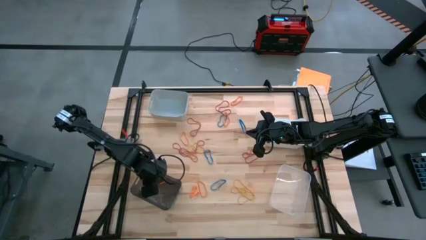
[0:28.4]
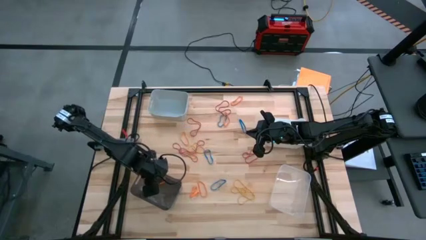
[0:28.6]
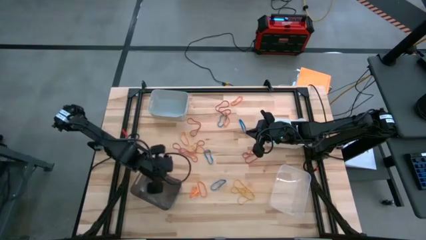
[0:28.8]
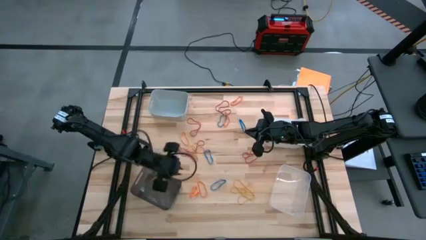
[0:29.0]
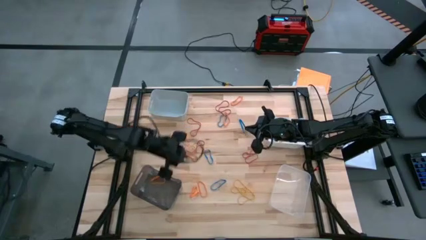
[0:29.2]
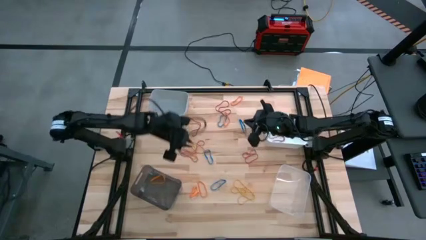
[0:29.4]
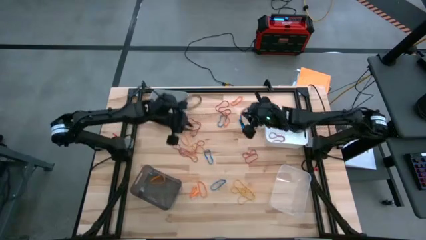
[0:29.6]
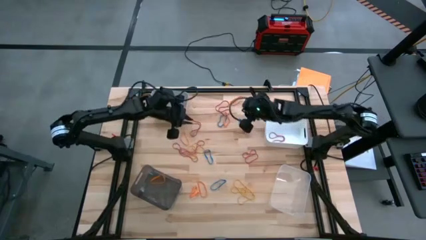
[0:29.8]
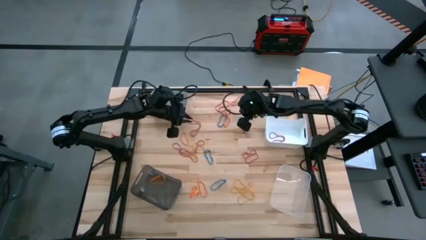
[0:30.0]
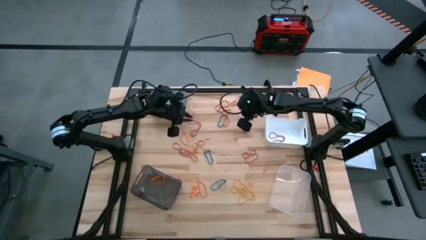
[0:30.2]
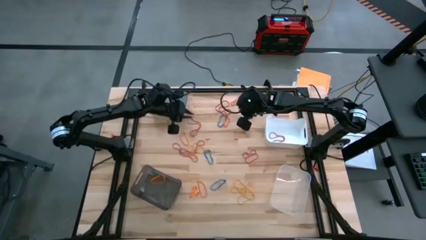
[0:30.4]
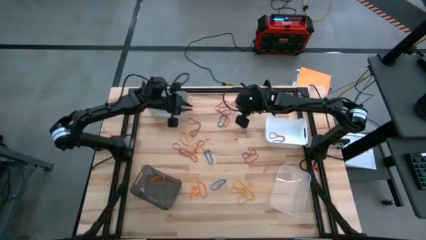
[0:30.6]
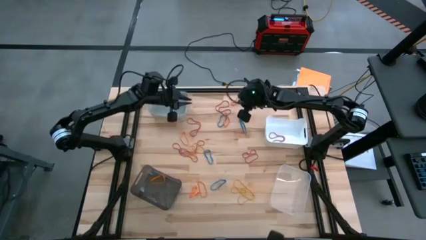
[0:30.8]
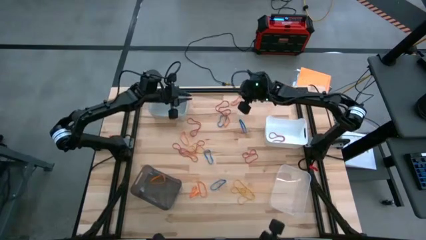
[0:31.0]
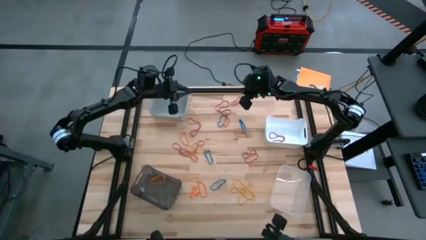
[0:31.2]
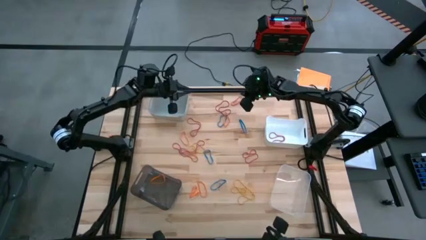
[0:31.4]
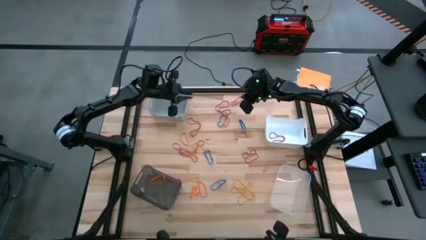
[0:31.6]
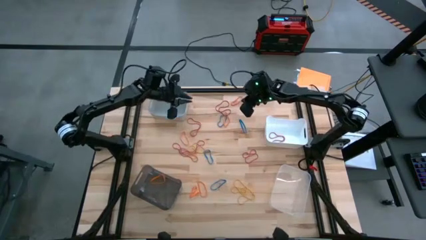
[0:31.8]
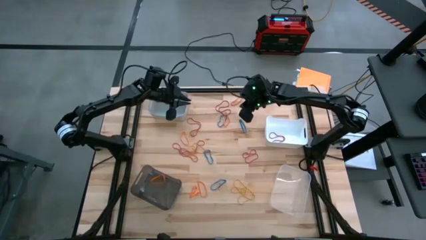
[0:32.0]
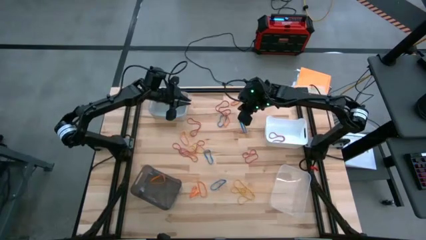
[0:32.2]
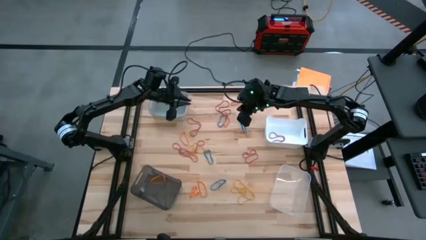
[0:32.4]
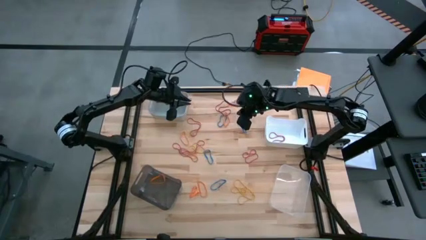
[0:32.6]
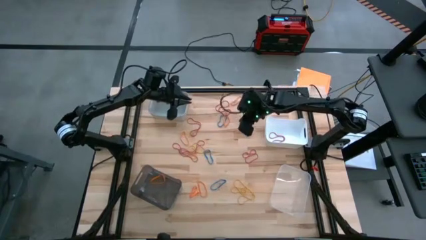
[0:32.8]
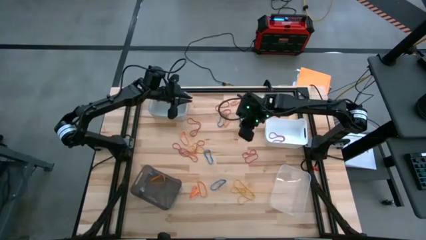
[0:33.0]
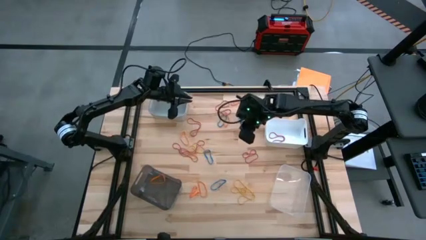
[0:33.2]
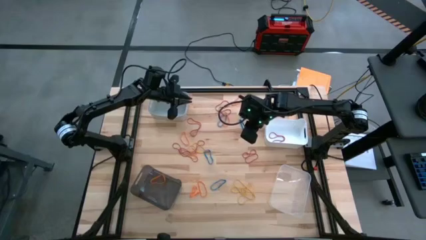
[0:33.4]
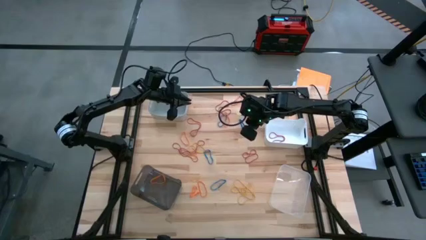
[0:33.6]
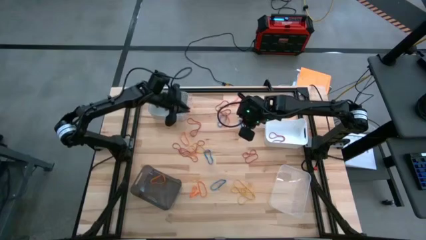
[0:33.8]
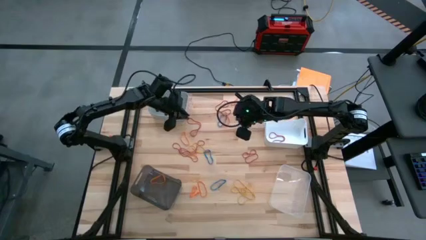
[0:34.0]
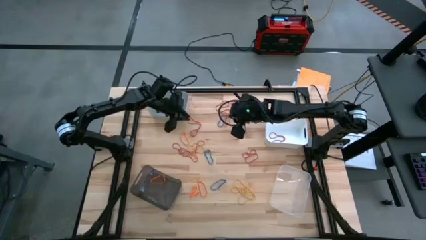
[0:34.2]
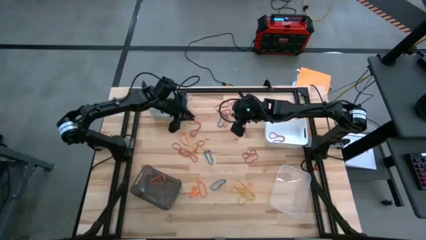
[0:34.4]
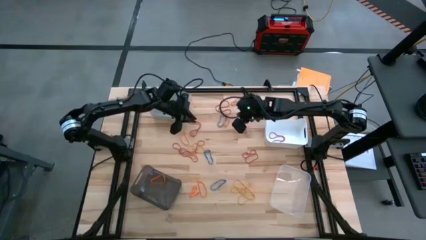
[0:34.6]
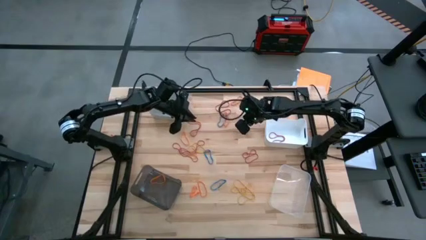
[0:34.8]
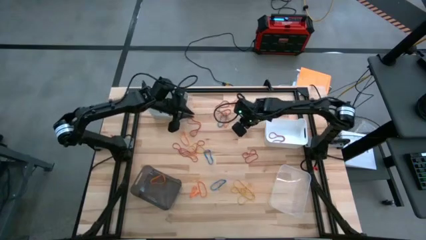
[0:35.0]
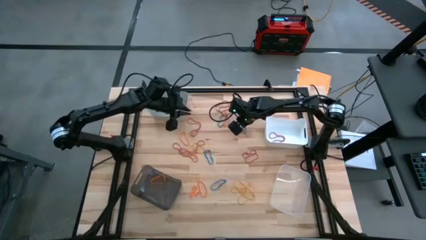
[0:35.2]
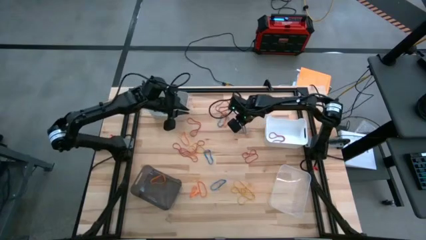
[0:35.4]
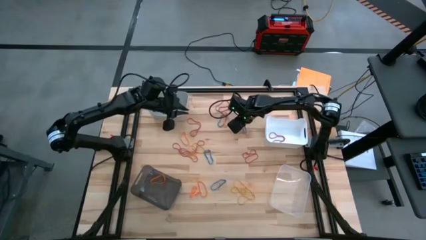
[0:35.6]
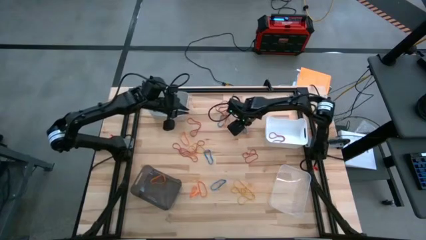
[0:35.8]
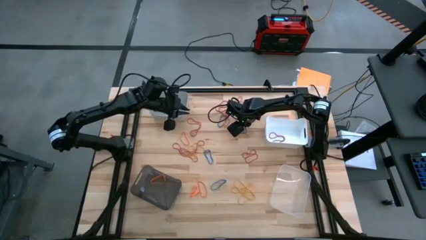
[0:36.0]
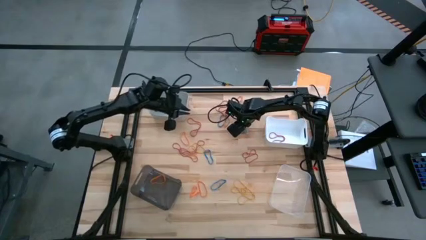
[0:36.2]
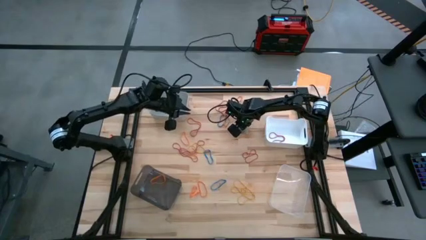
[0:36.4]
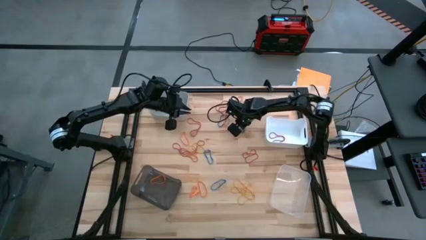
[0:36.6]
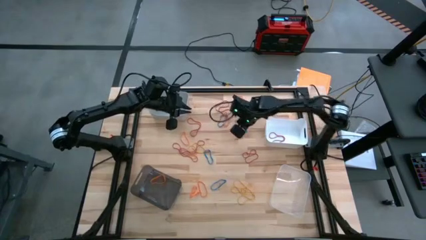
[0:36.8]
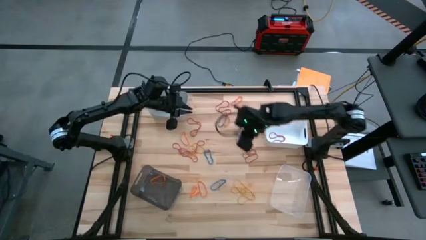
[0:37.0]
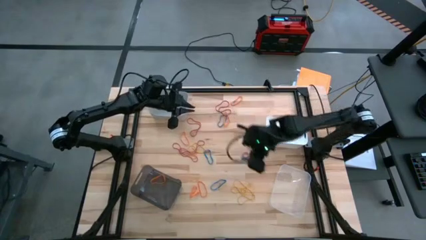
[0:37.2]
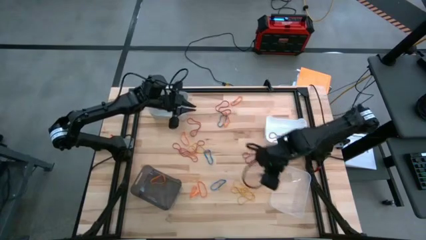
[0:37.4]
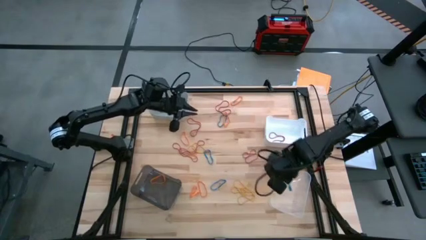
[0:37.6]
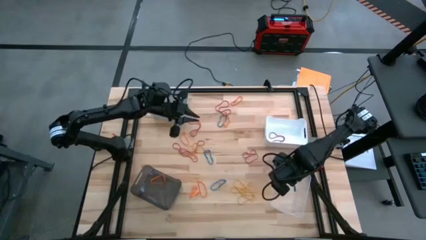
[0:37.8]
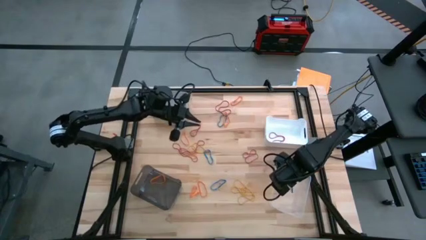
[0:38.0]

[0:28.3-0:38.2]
Task: Sort rubber bands into baskets
Put the blue rubber band into the transparent bin

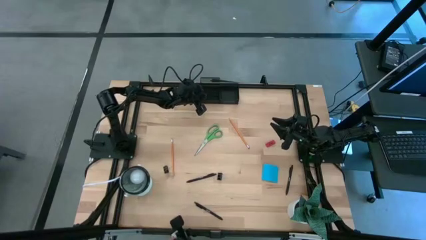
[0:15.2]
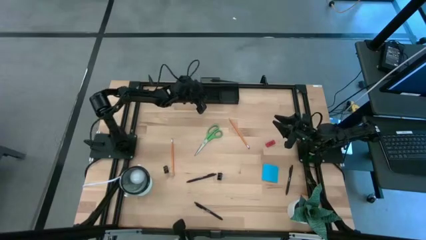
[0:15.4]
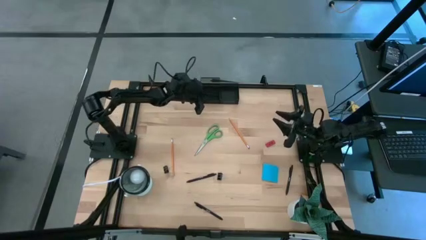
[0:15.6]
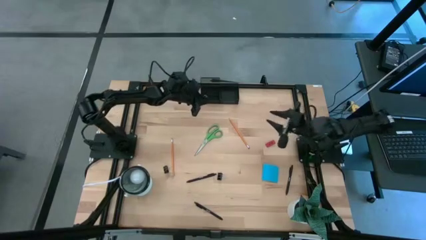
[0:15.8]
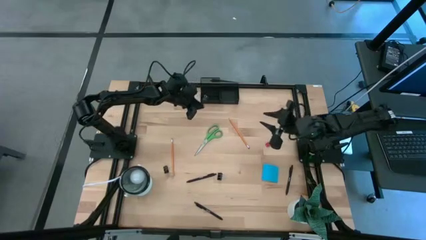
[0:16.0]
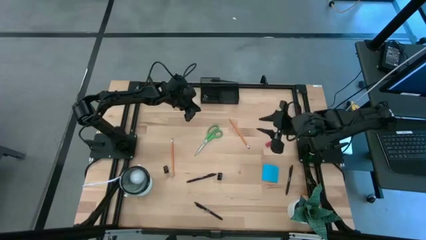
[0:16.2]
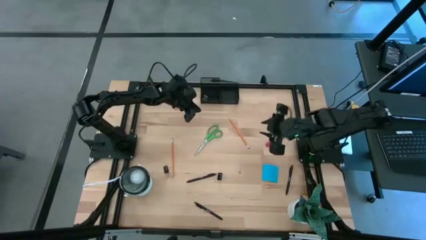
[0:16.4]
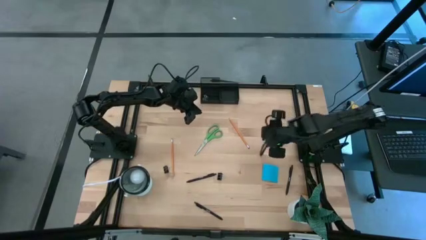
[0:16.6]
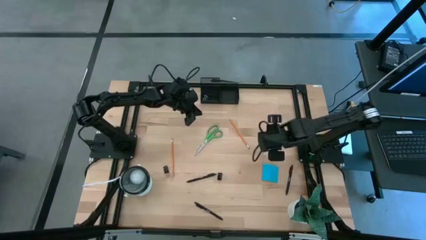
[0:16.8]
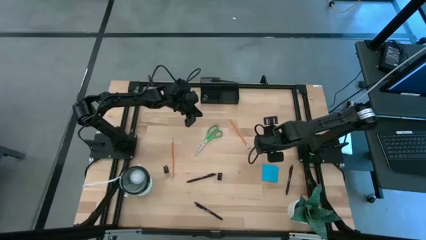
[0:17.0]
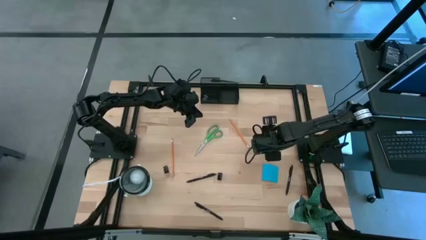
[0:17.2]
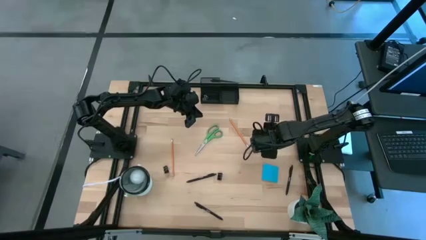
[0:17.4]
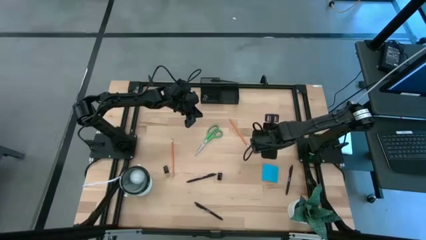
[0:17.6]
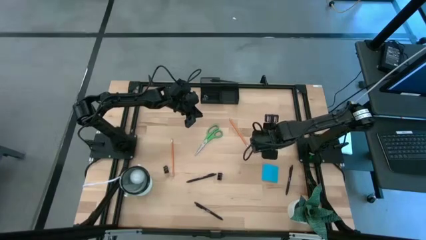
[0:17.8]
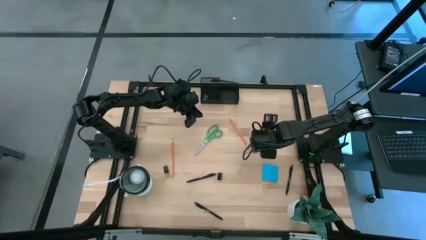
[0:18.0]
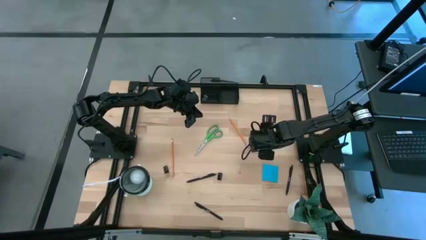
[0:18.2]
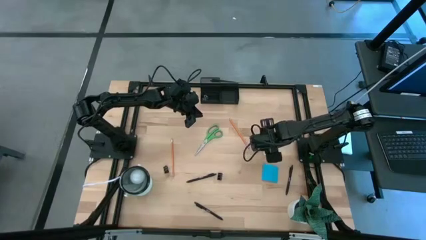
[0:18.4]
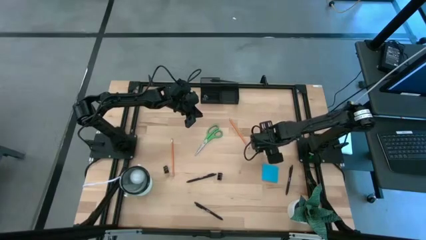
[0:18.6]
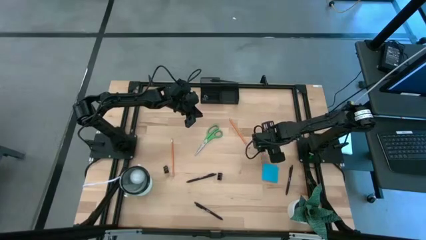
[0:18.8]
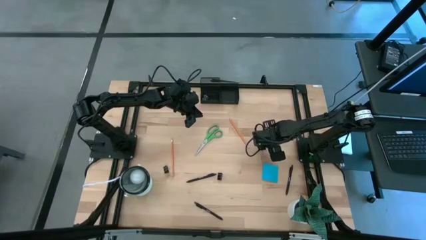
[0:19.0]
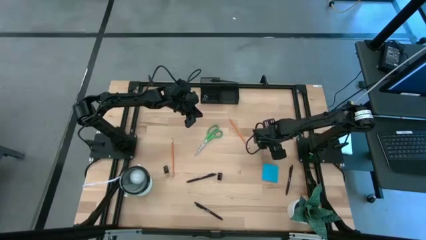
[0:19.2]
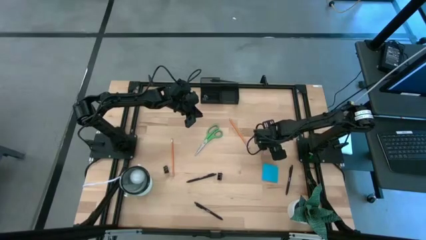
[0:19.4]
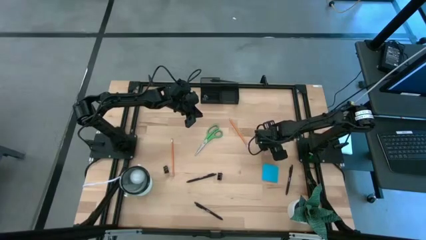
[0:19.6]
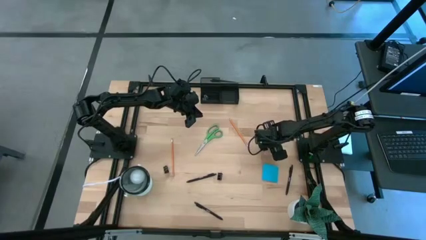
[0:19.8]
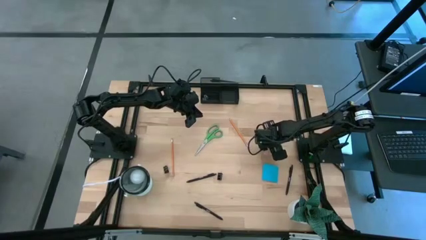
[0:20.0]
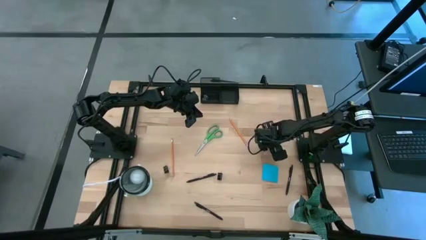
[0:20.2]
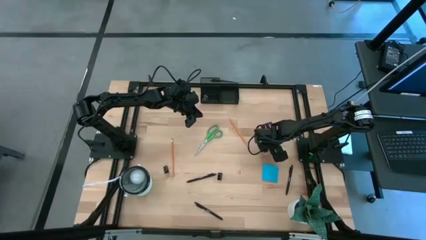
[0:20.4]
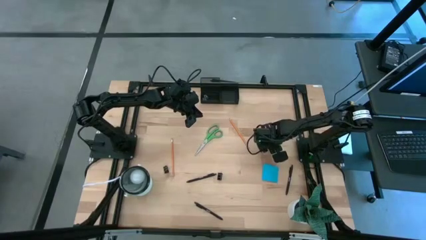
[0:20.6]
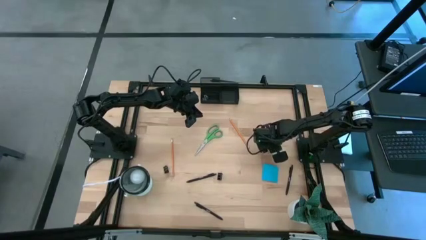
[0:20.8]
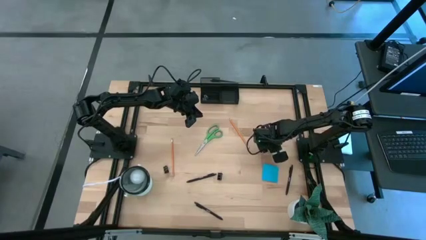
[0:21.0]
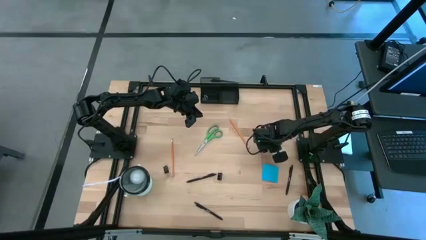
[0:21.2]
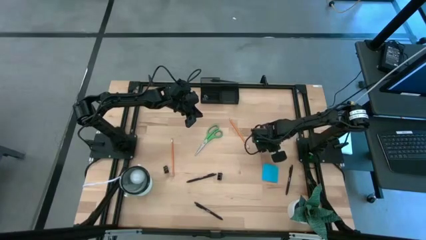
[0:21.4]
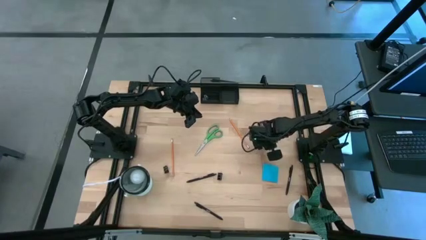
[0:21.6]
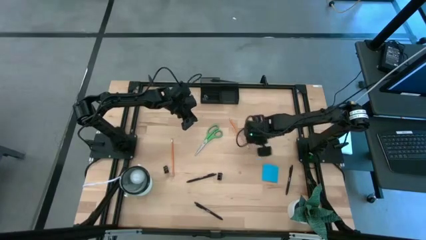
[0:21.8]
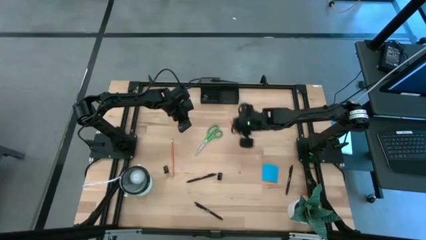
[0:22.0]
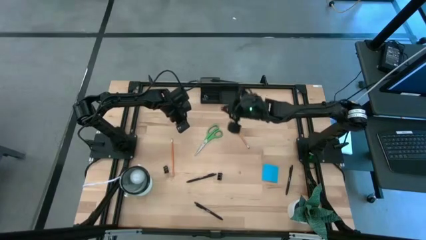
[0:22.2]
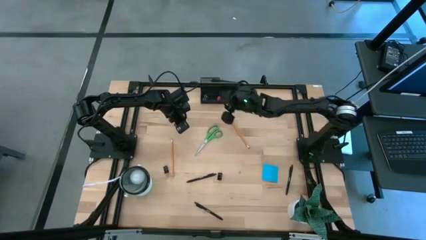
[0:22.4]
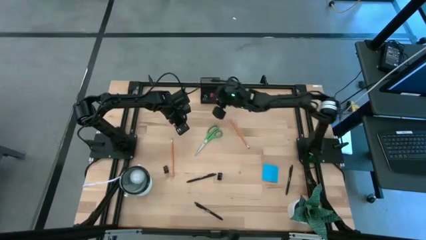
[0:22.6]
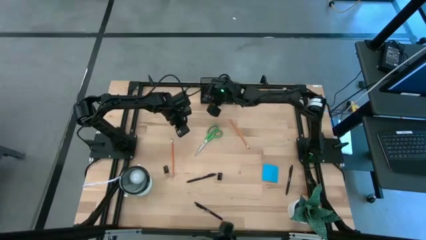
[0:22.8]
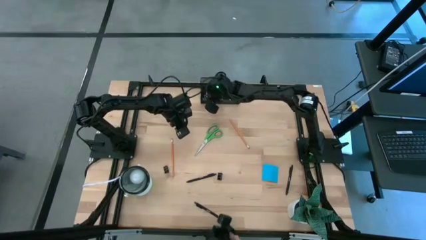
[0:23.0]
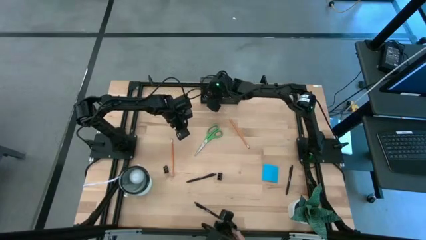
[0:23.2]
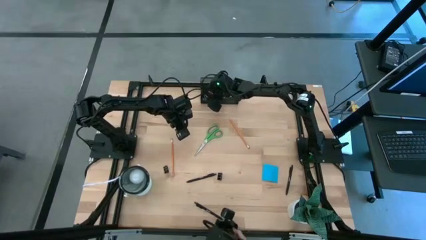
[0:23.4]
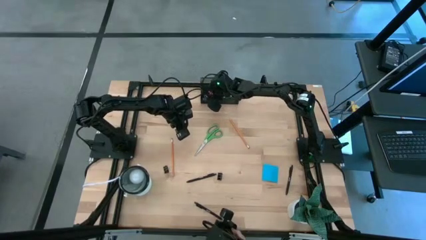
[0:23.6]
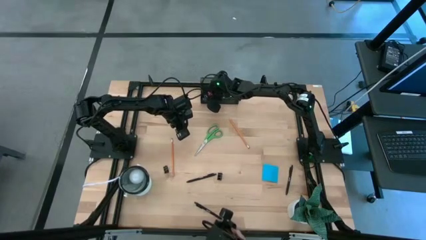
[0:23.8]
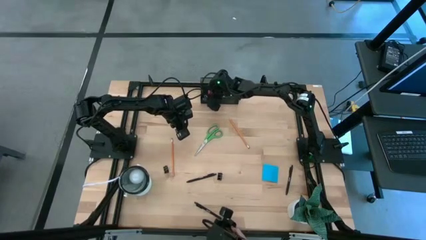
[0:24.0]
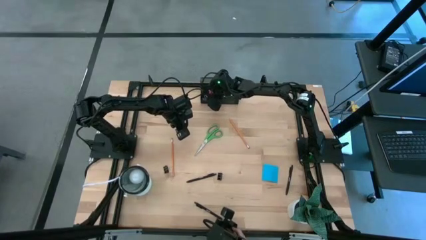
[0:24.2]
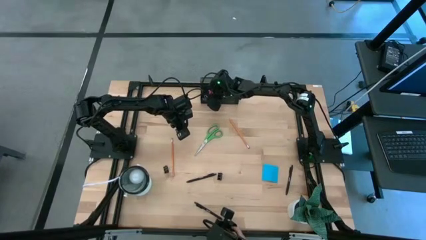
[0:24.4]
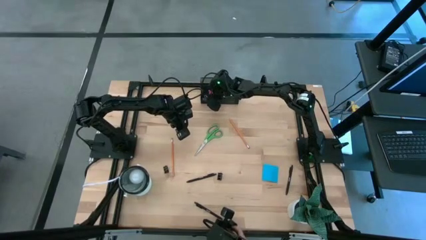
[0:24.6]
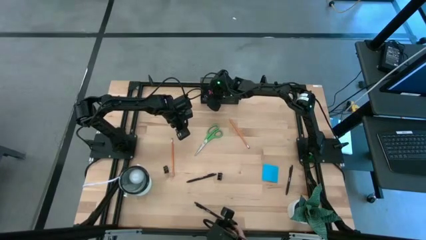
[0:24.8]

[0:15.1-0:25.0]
Task: Pick and place office supplies into organizer
Put the orange eraser into the desk organizer
